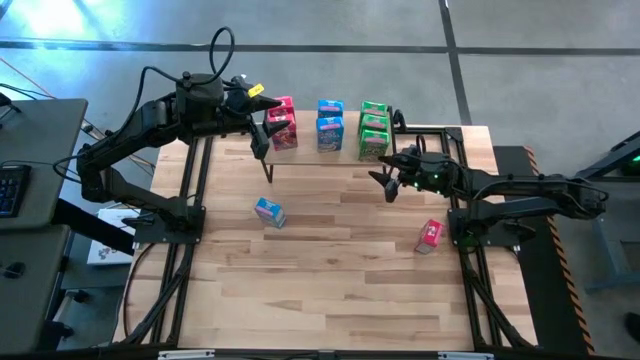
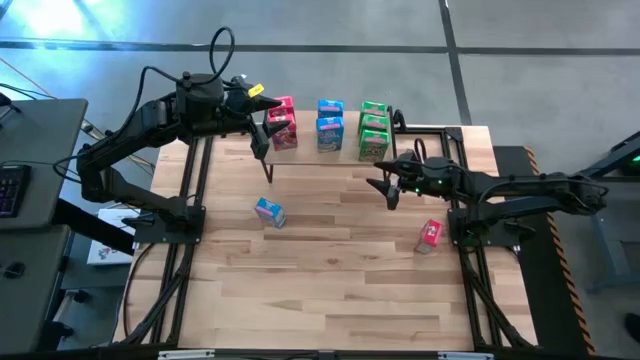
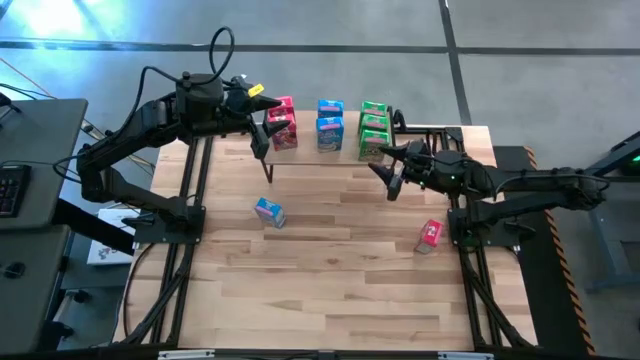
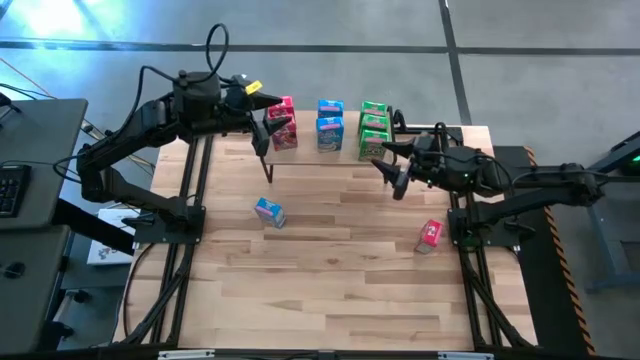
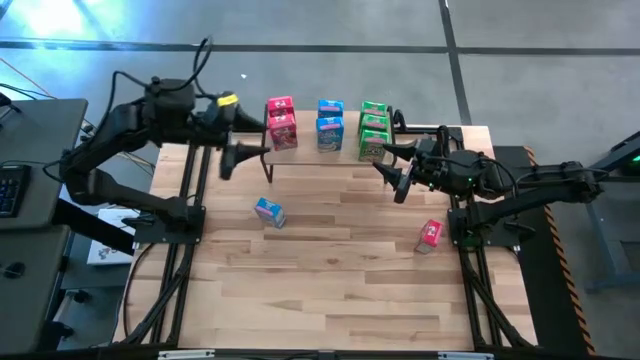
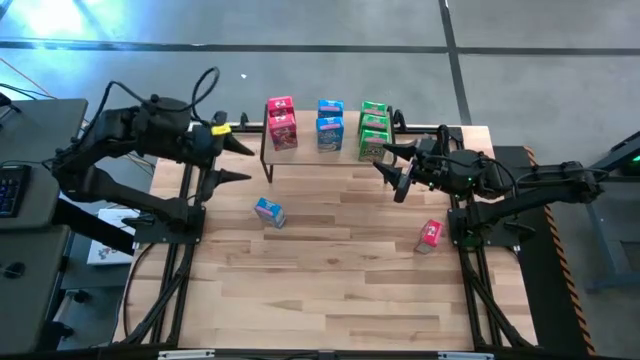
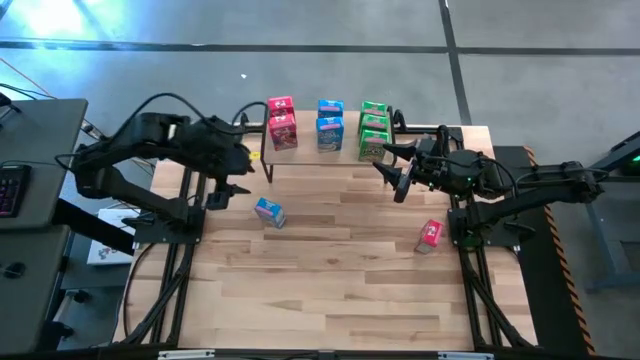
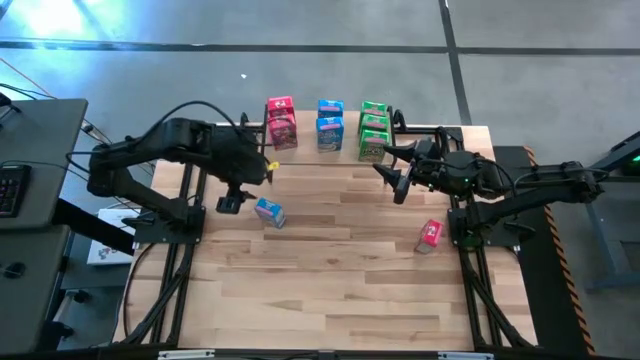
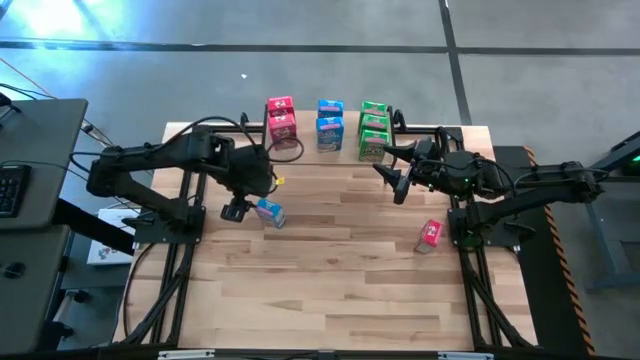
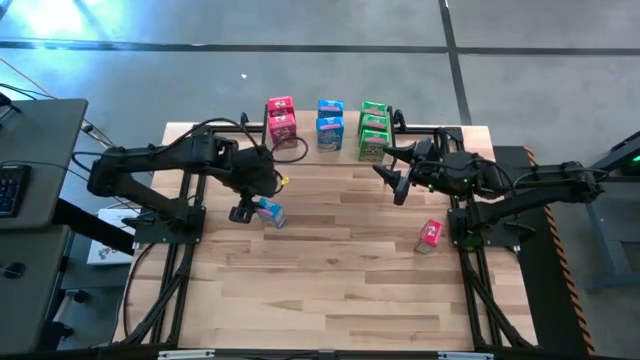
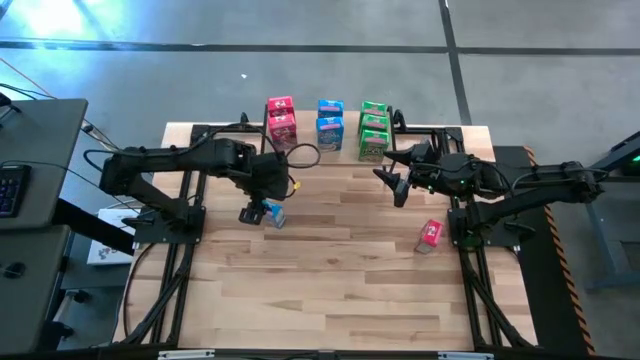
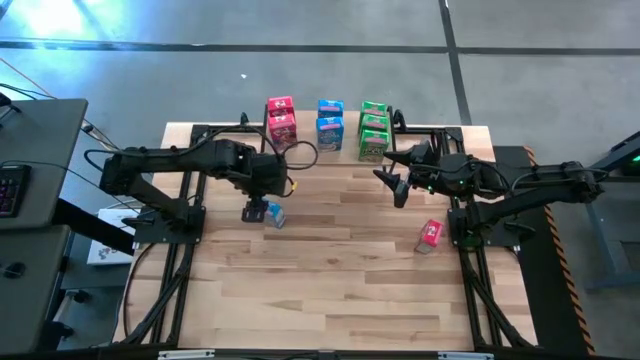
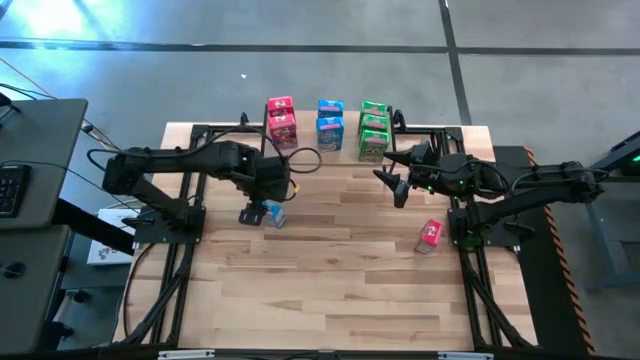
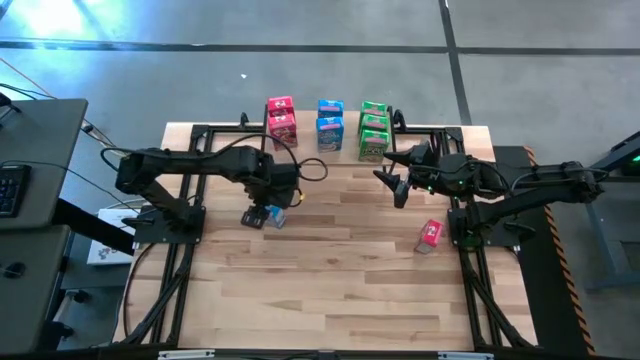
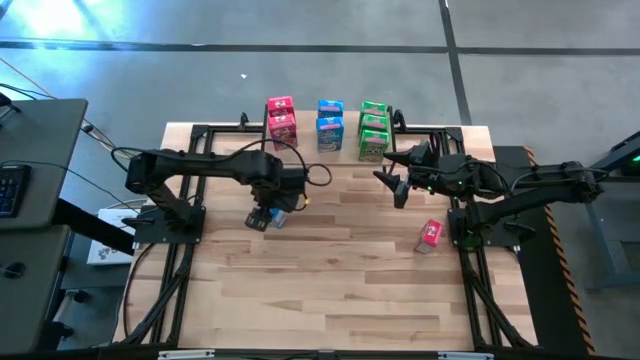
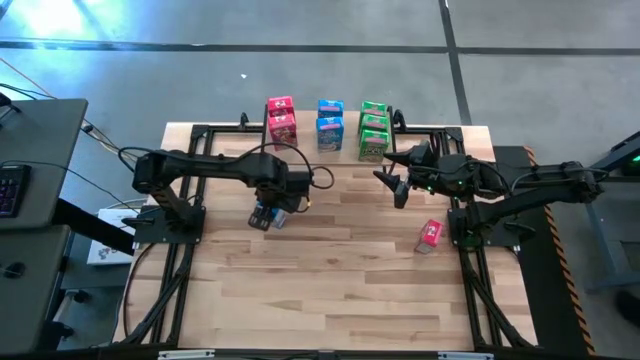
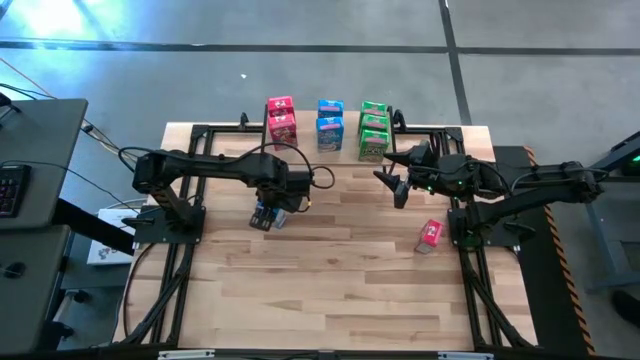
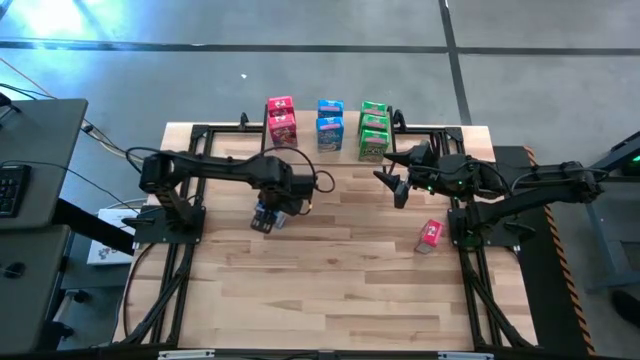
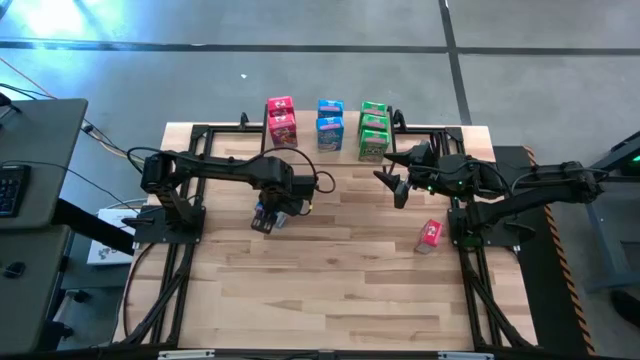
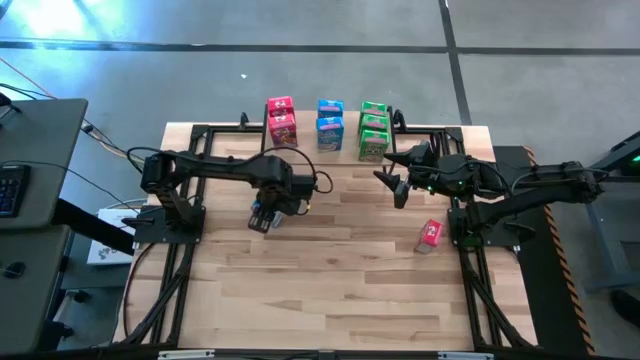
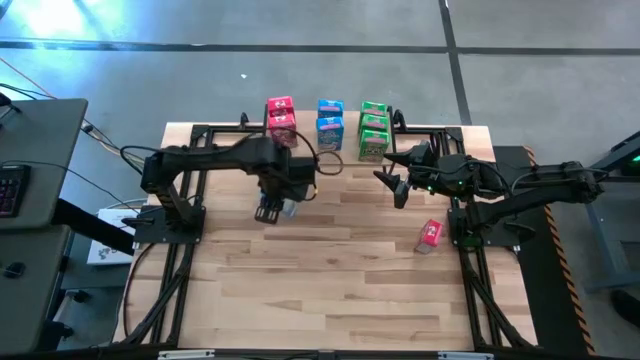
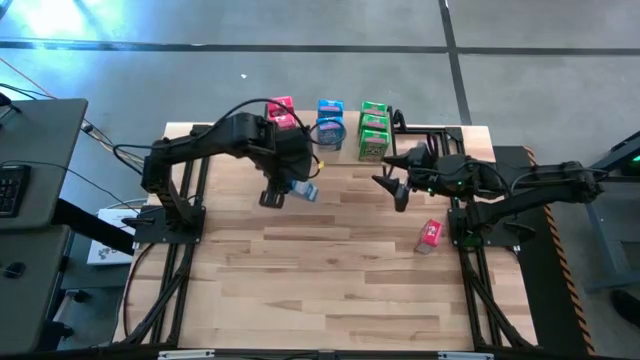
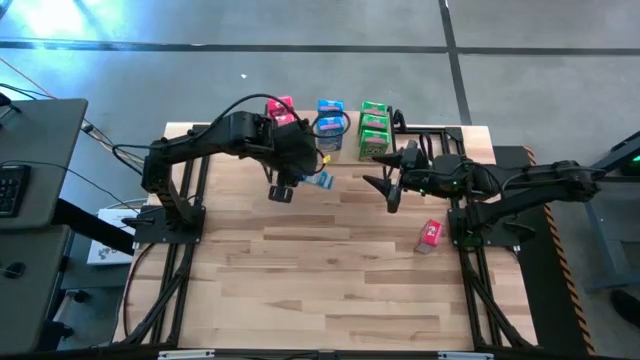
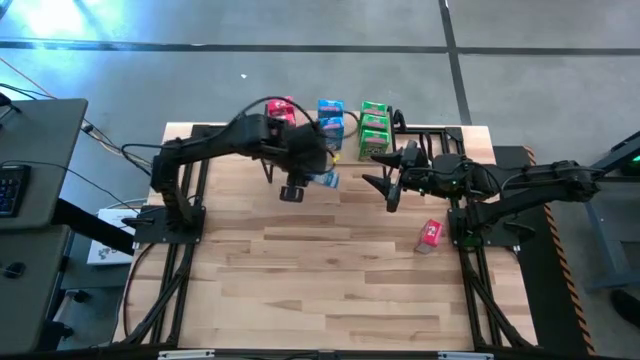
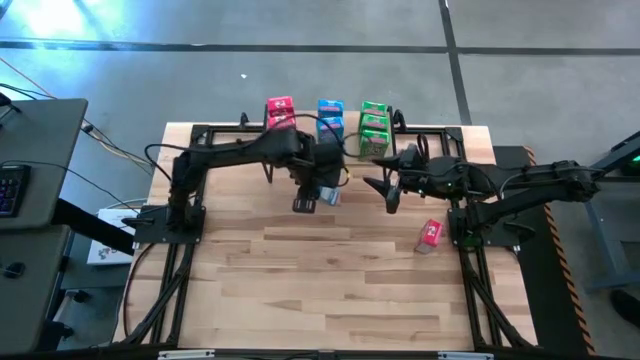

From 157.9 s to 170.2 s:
Task: Stack cereal on shelf
Put the blue cereal box on the center of the table aligned with the other blue cereal boxes

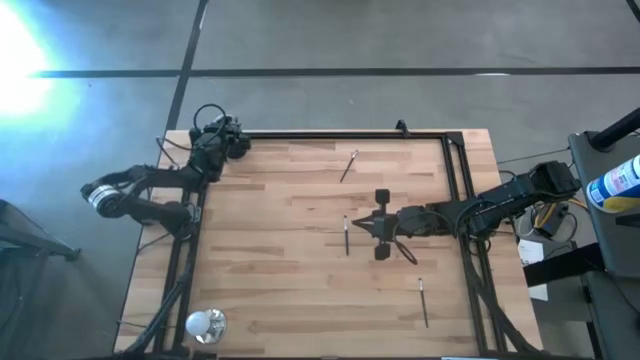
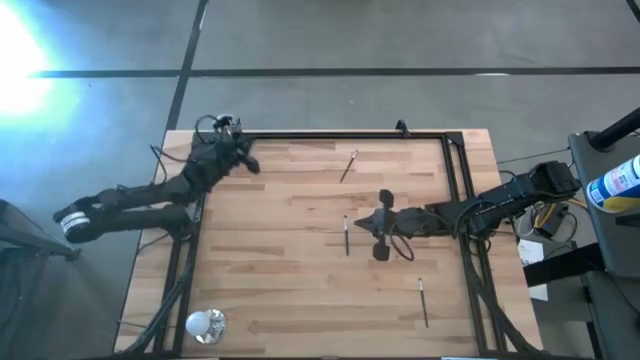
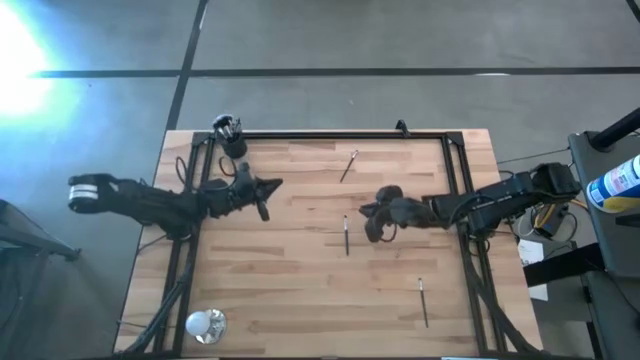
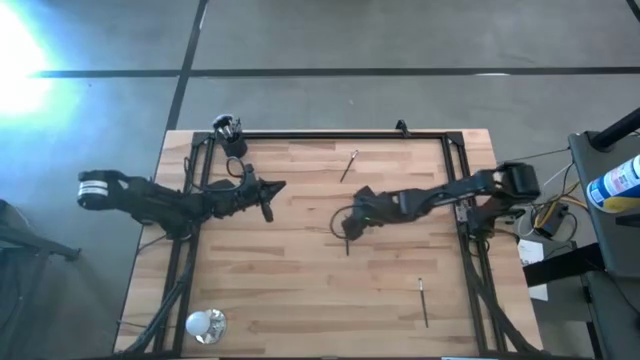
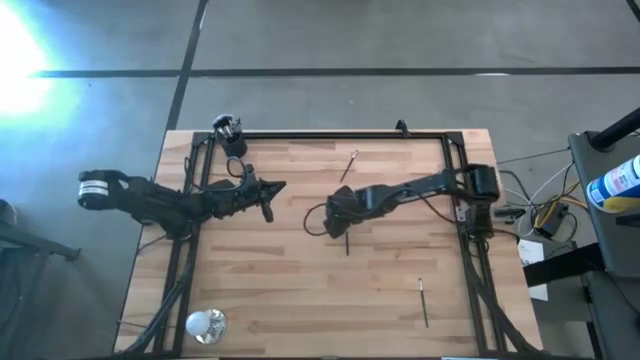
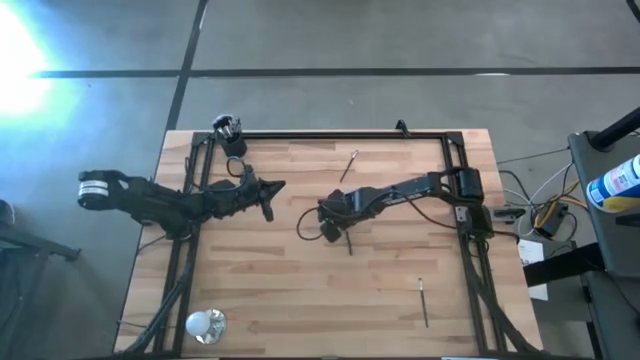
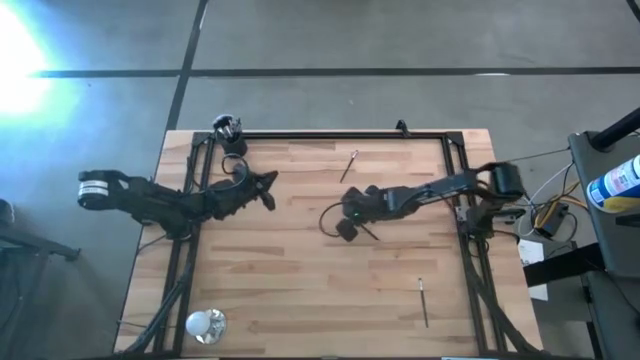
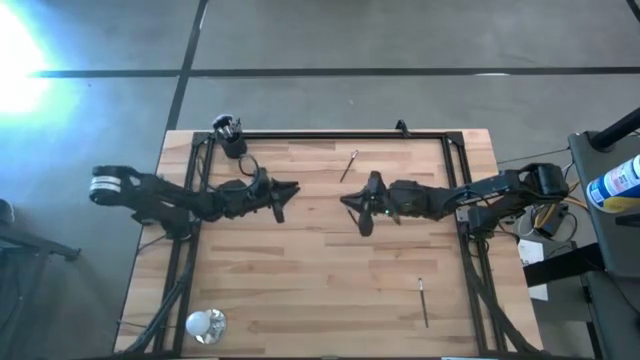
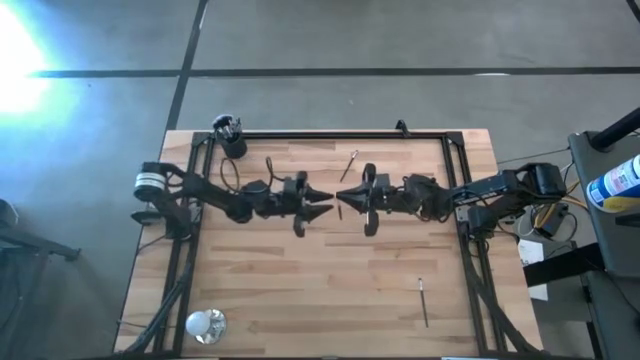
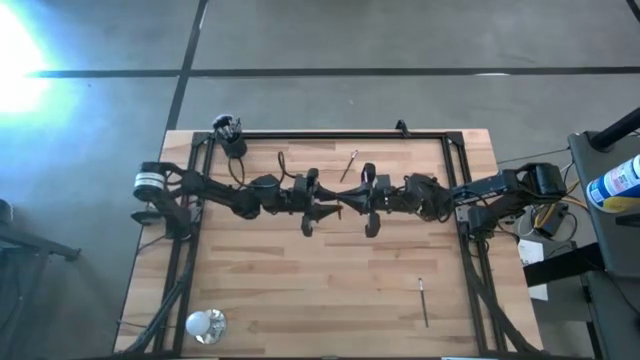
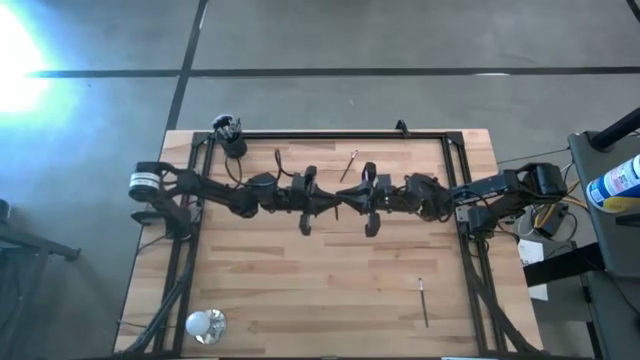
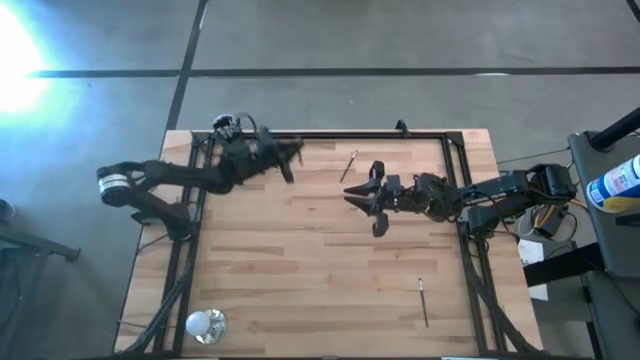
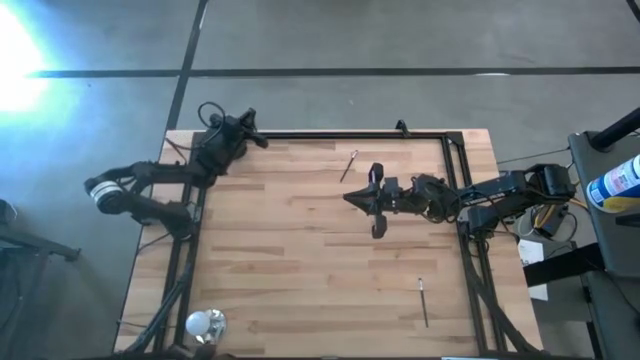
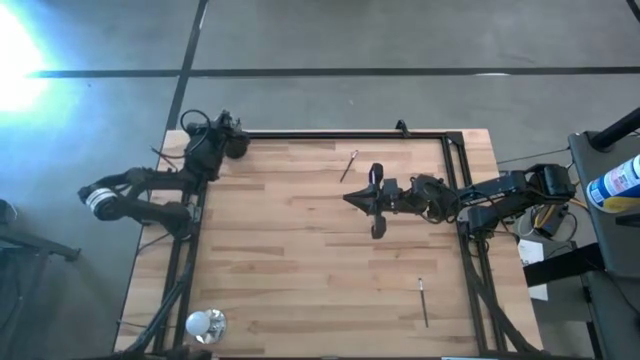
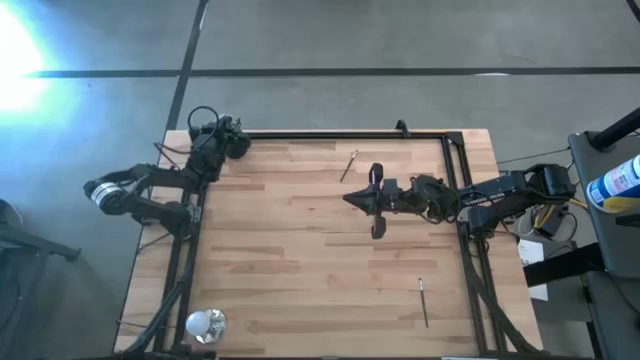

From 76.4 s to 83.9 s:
Task: Put items in baskets/containers
Put the black eyeshadow brush into the black pen holder

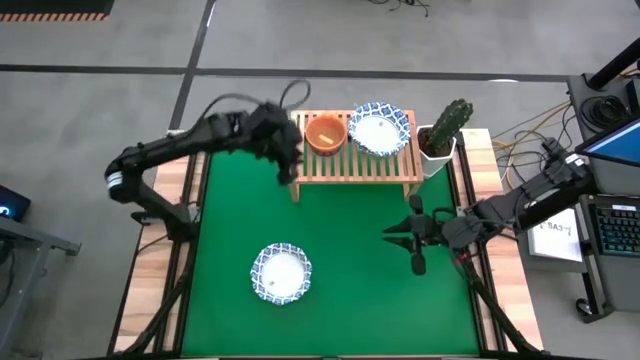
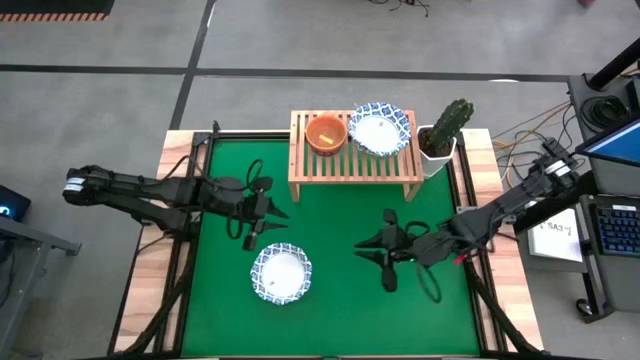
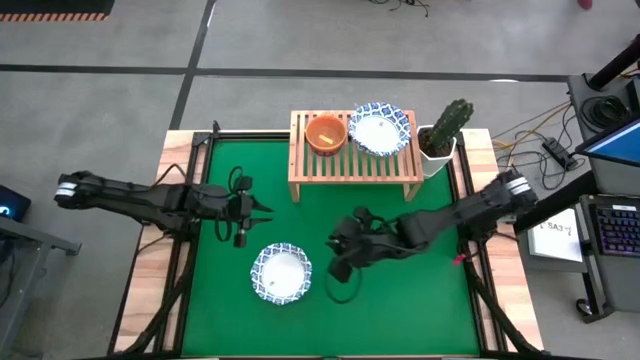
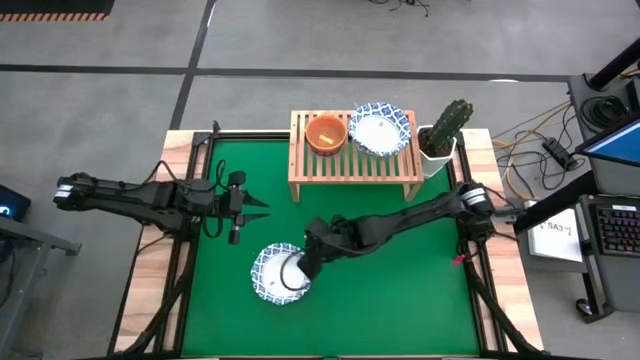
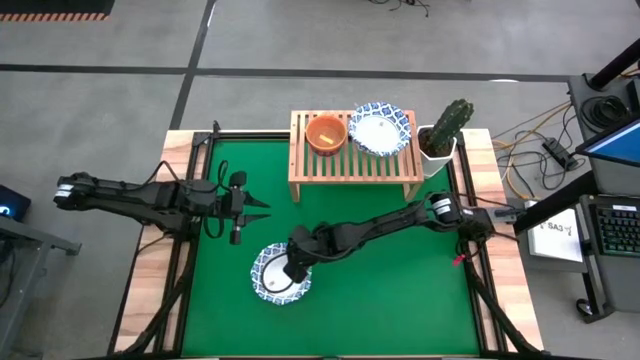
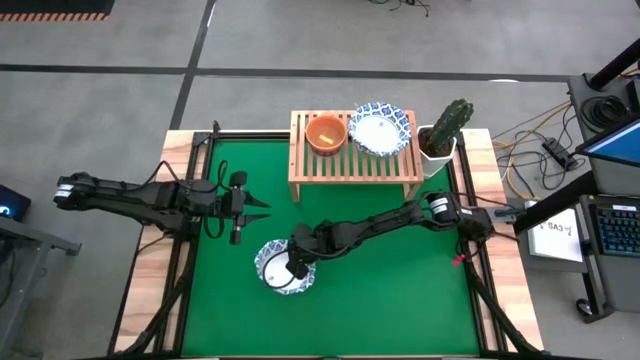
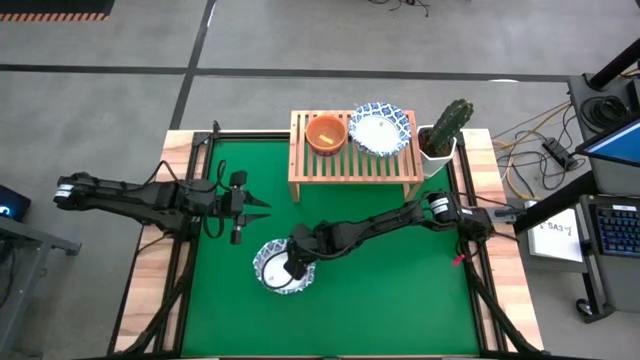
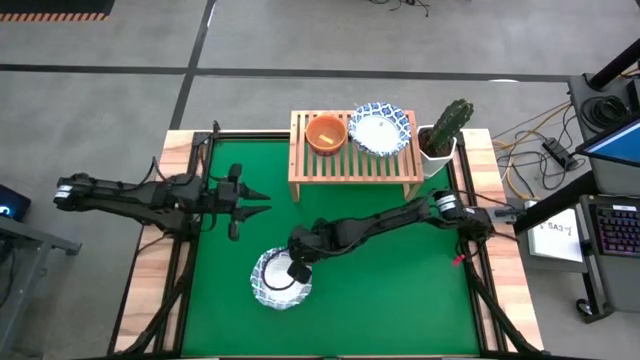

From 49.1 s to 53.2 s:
Task: Place and stack bowls onto a shelf
Stack the big white bowl on the big white bowl on the shelf
